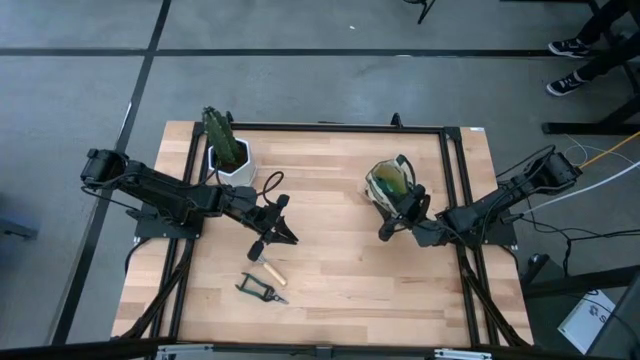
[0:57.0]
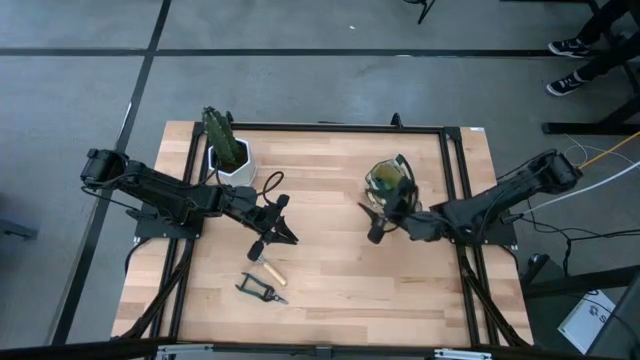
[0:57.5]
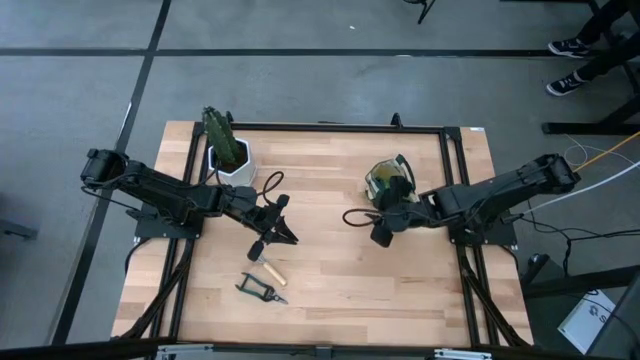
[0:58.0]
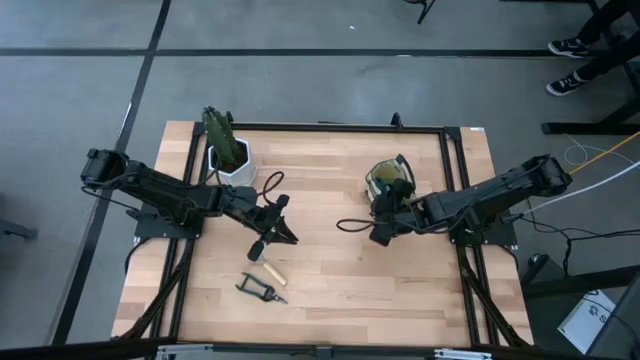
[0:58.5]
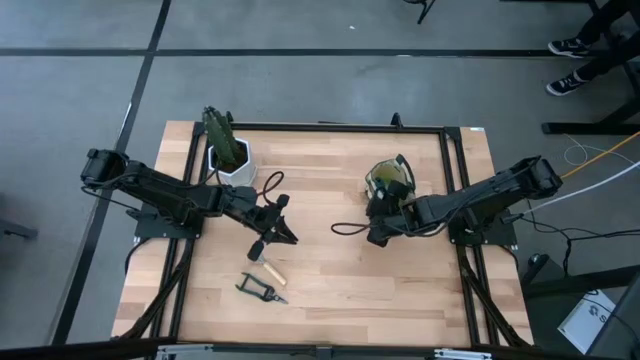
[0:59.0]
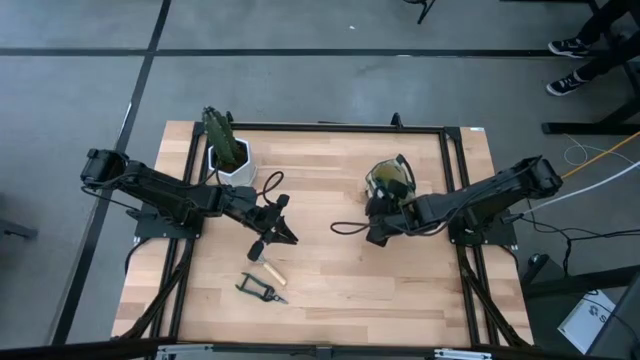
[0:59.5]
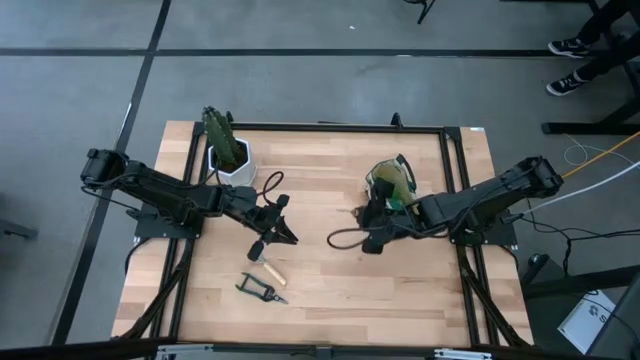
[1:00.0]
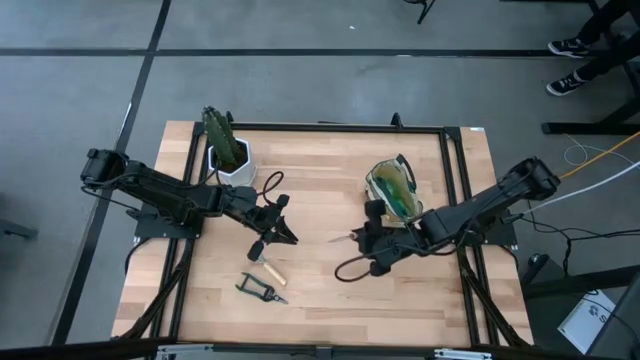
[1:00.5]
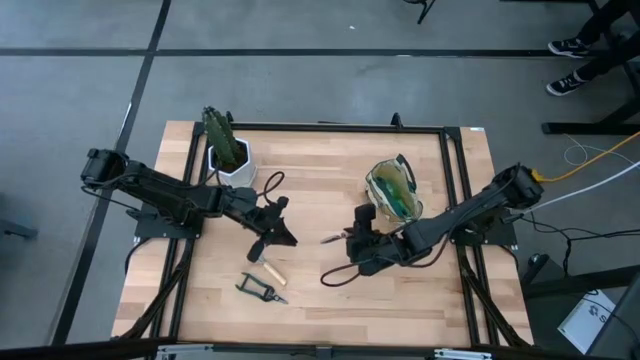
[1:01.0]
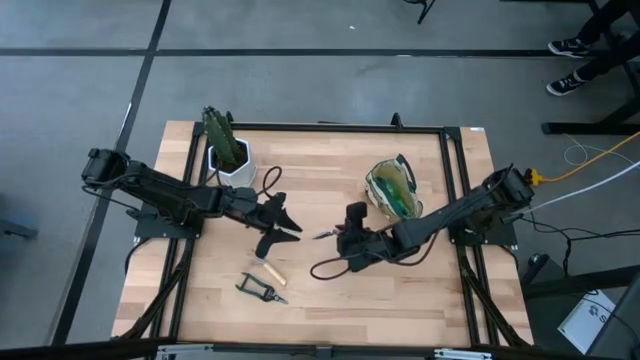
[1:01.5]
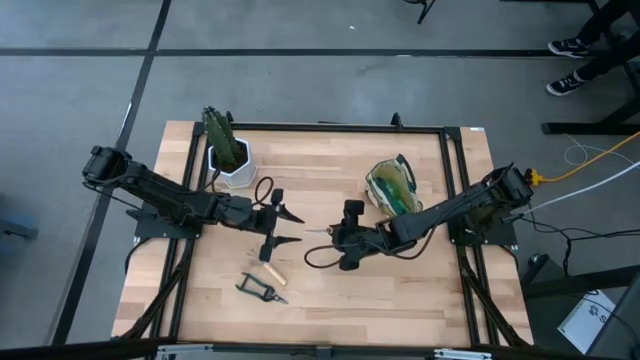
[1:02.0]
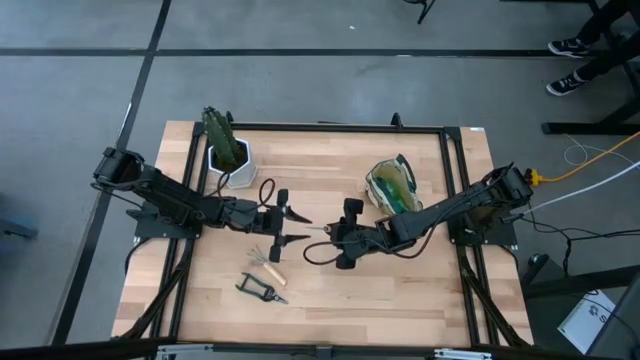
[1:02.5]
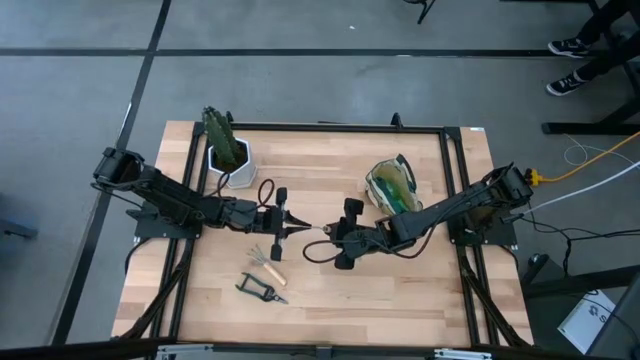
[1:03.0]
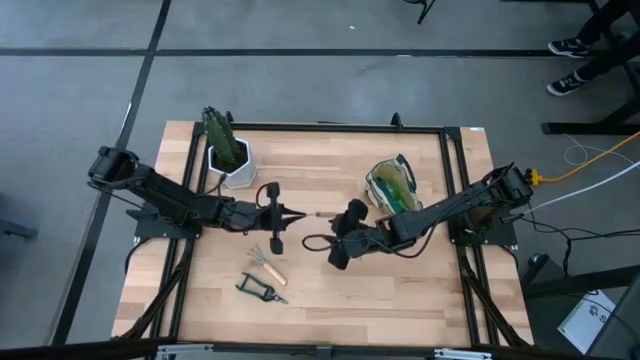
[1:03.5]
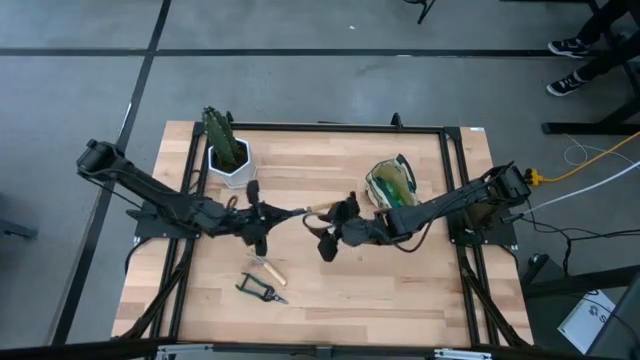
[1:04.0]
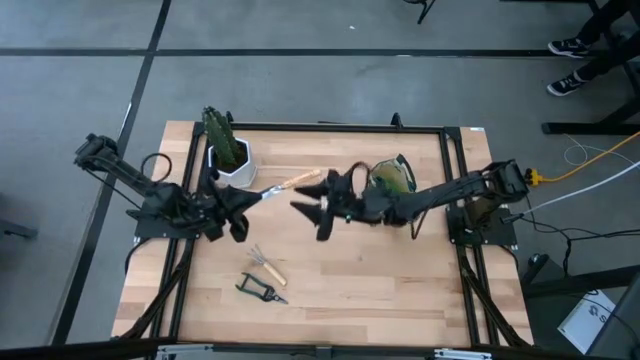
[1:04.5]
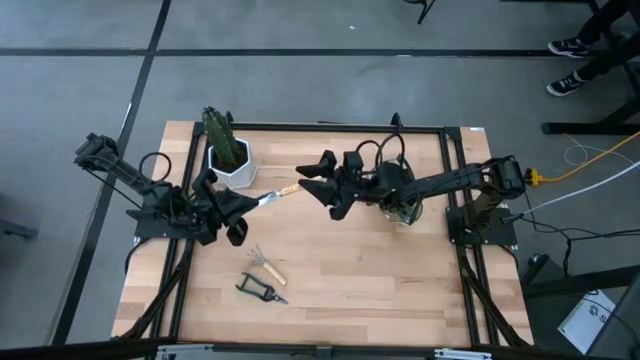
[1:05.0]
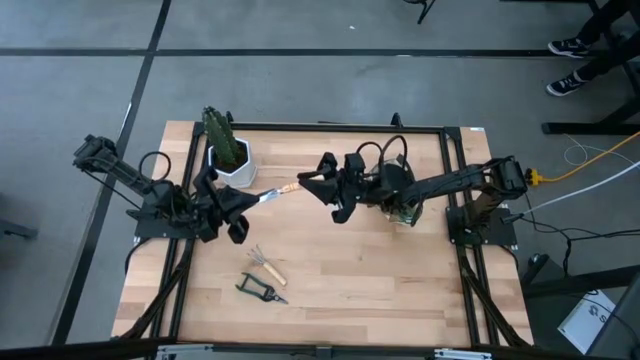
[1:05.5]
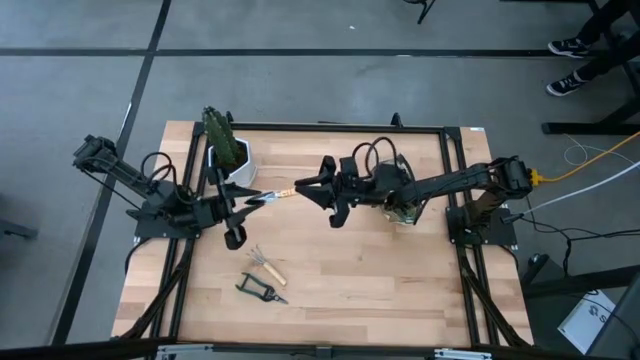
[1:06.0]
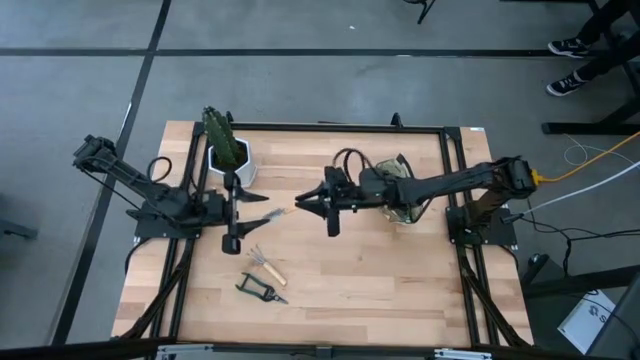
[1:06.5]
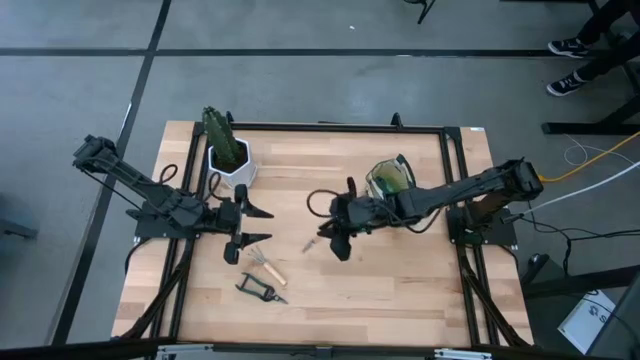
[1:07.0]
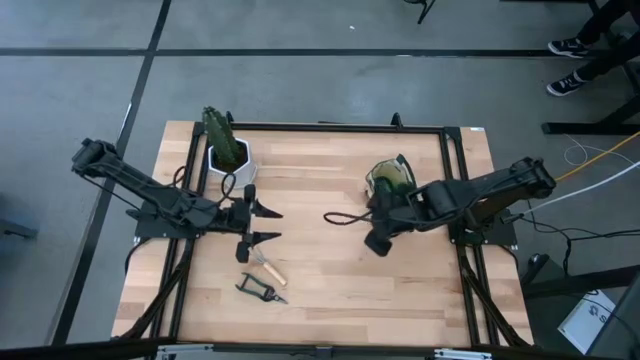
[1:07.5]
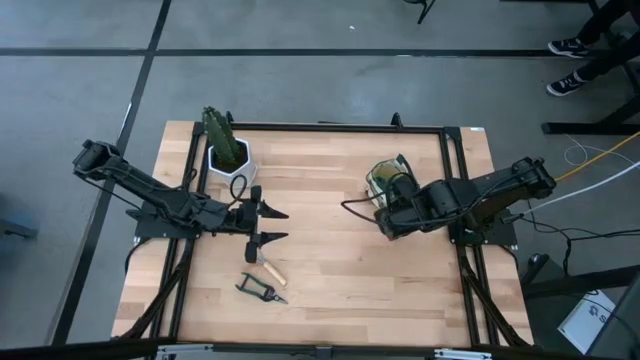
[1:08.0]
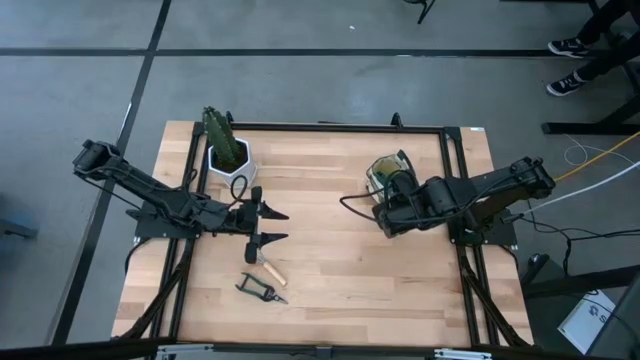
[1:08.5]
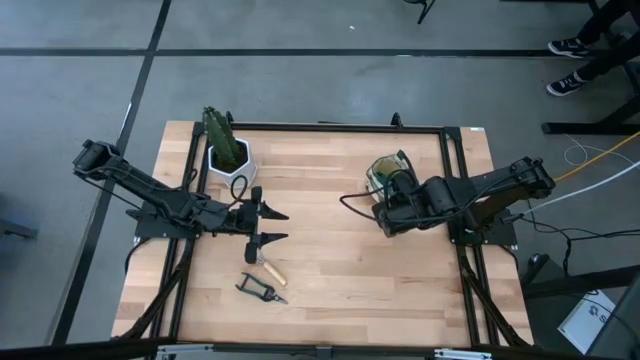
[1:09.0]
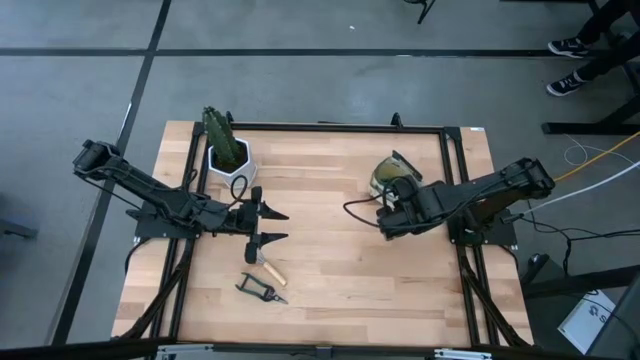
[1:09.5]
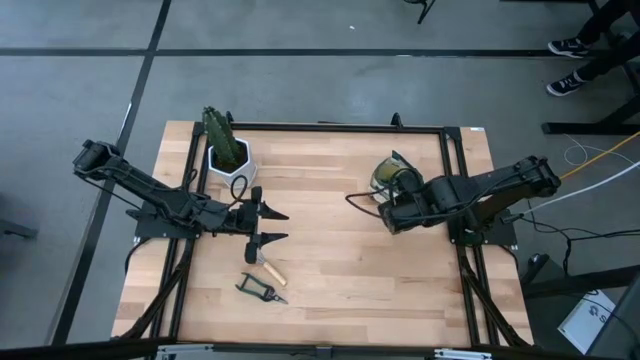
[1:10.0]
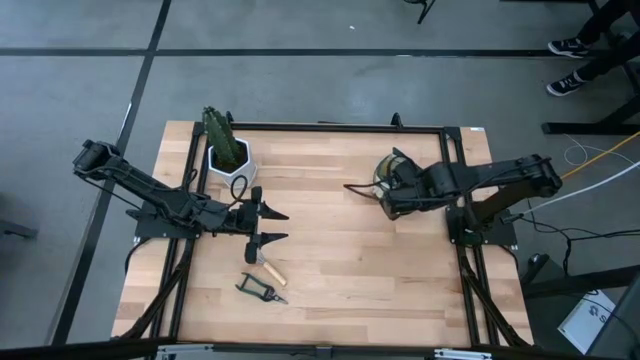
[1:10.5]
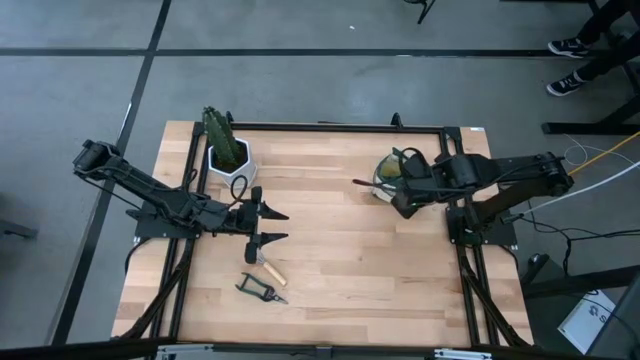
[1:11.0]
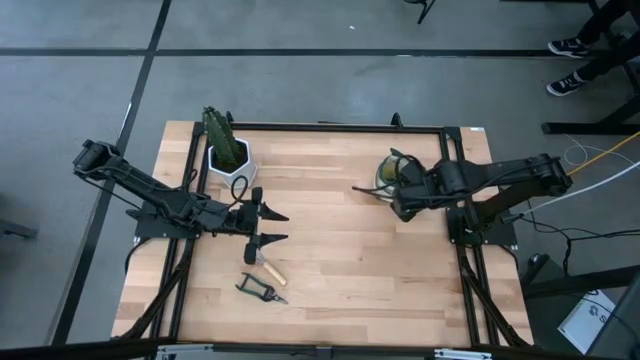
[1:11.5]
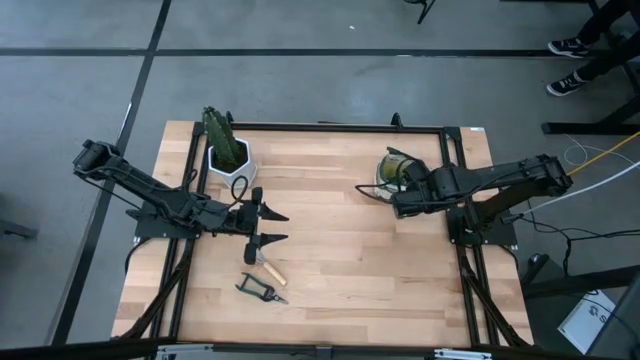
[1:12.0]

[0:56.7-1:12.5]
Task: Pick & Place Garden tools in Gardening bag
Put the trowel into the gardening bag

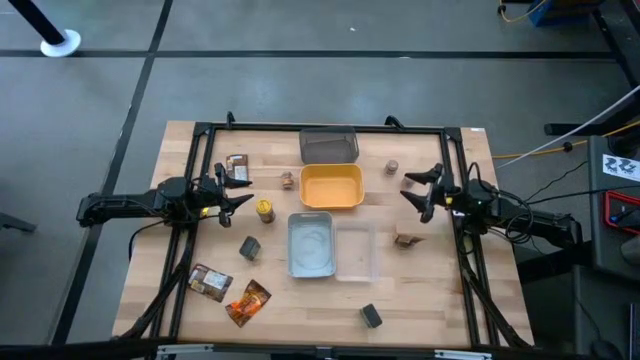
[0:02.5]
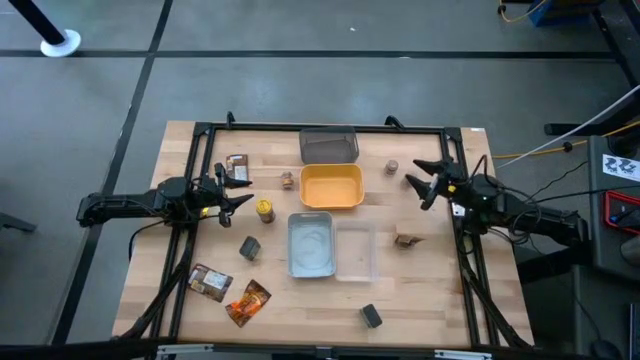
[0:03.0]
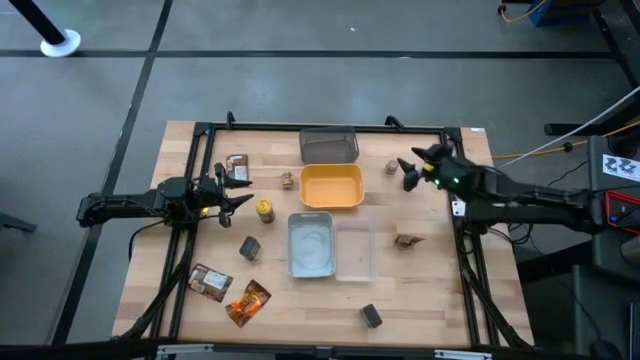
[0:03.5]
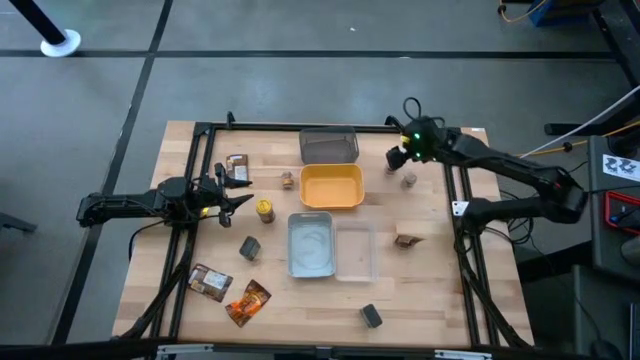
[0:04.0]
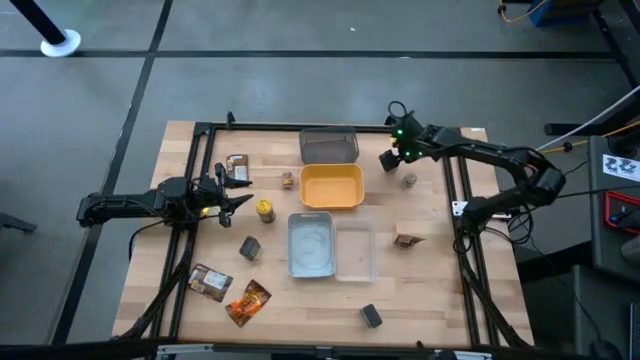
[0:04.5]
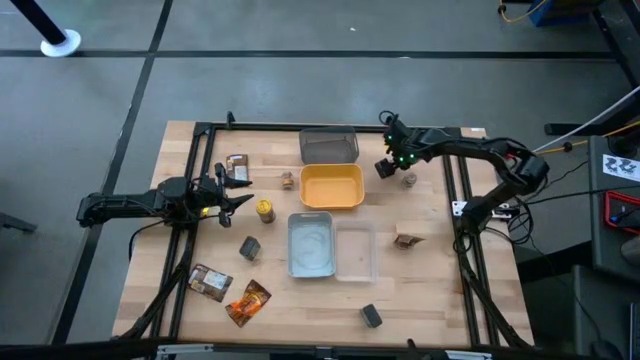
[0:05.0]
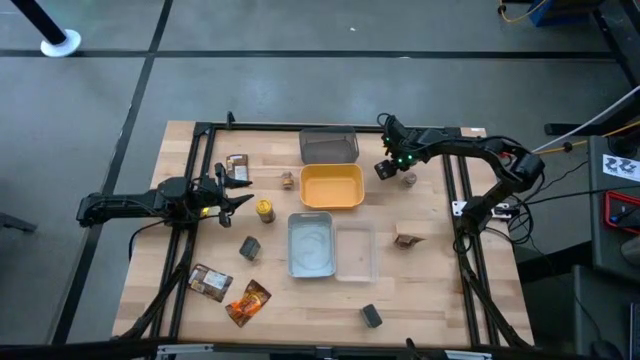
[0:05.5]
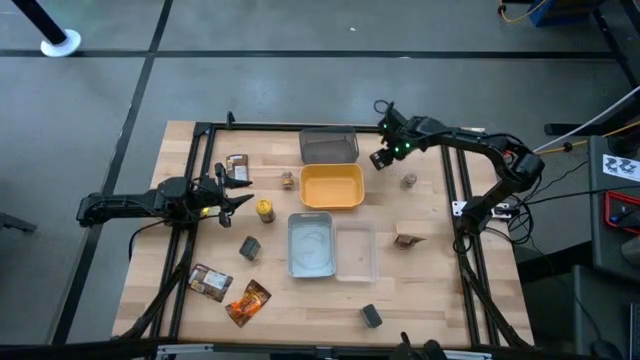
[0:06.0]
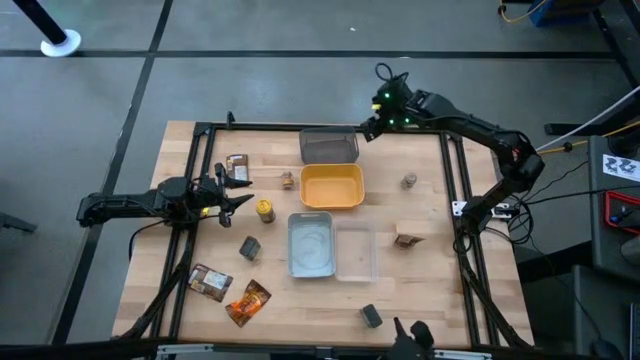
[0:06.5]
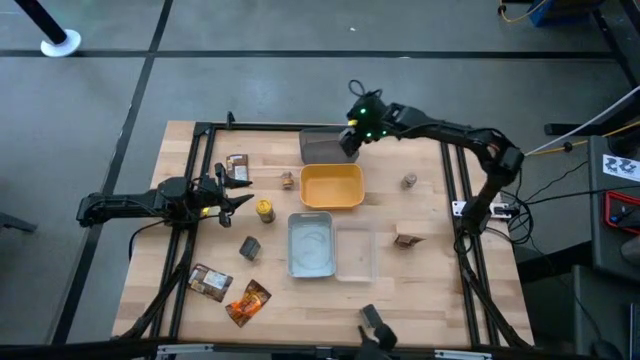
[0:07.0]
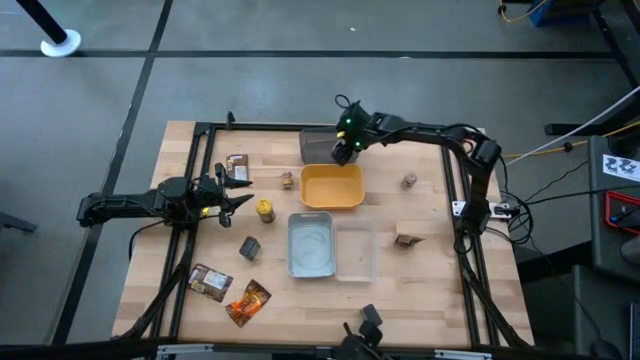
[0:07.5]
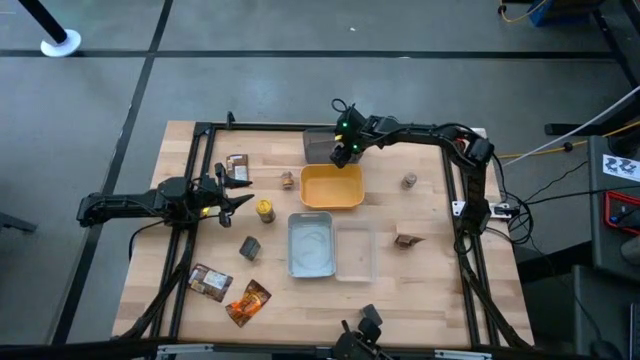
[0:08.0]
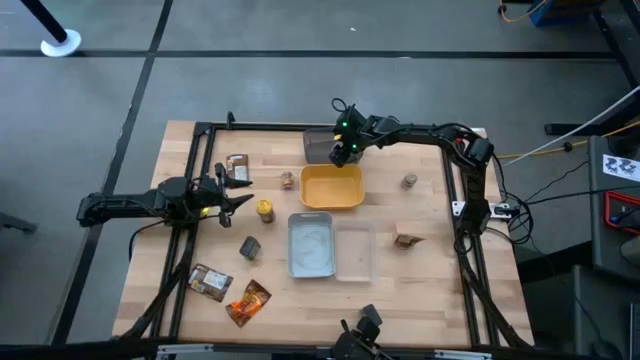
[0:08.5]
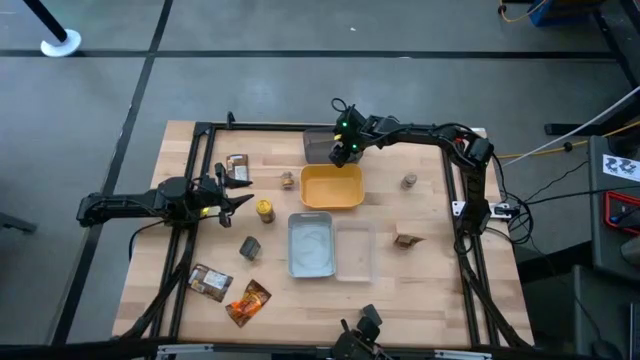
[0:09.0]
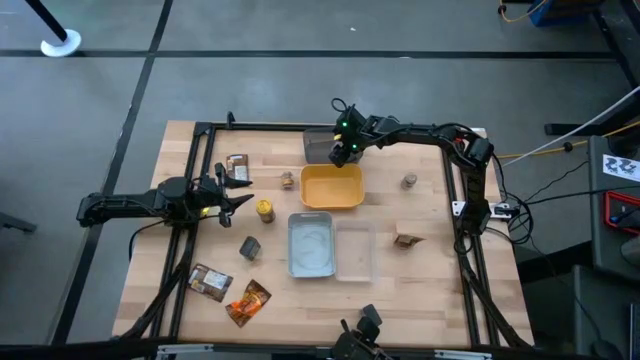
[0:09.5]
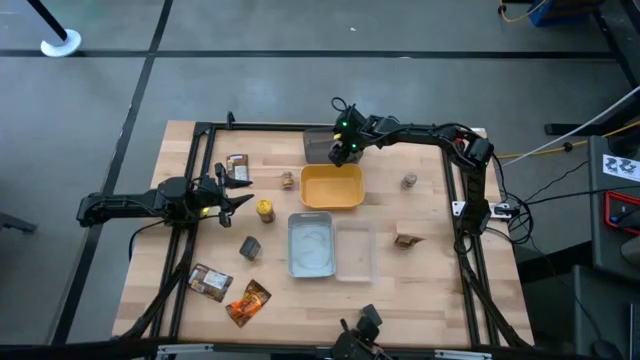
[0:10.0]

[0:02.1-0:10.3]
Task: Sort spices by type
Put the top right brown seasoning bottle into the black bin
